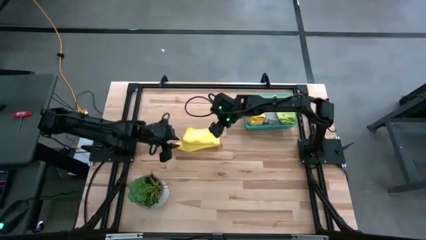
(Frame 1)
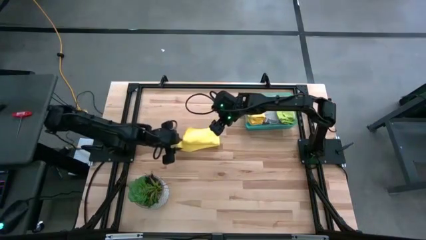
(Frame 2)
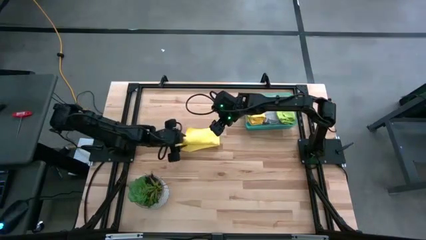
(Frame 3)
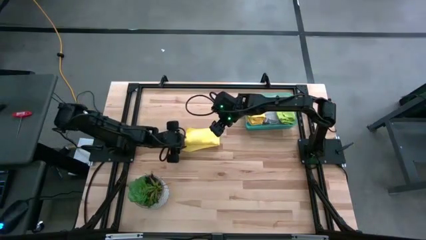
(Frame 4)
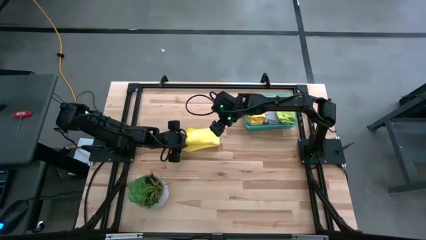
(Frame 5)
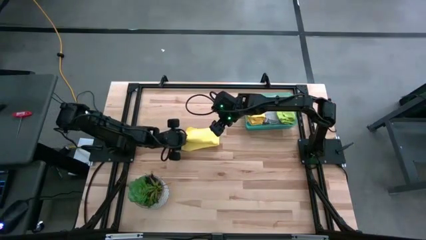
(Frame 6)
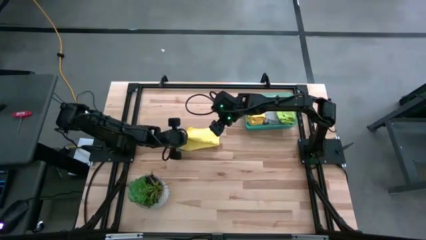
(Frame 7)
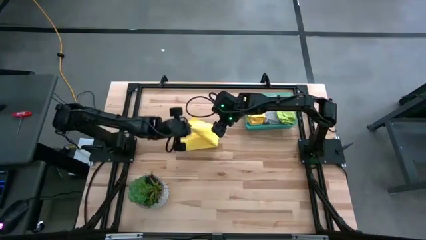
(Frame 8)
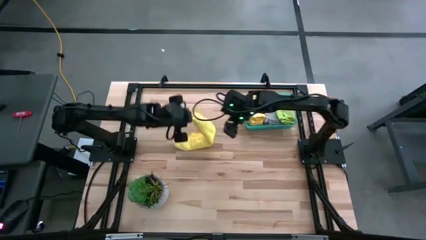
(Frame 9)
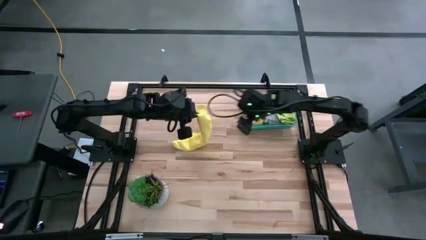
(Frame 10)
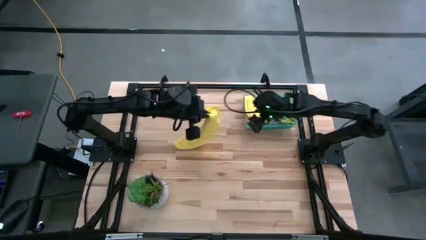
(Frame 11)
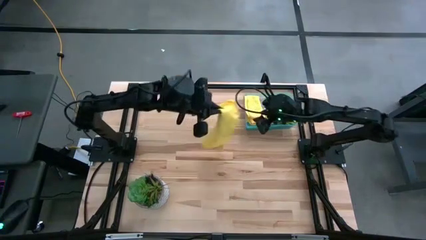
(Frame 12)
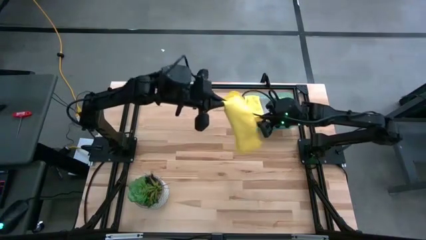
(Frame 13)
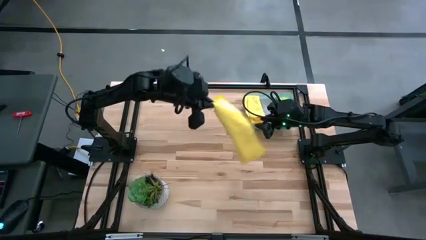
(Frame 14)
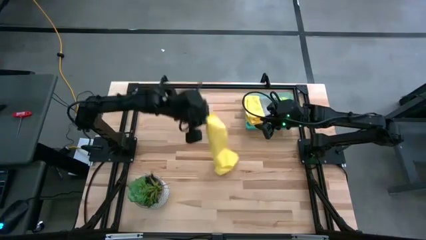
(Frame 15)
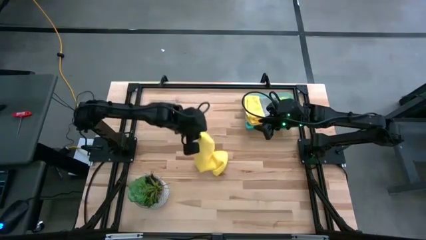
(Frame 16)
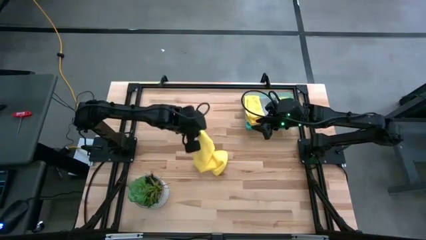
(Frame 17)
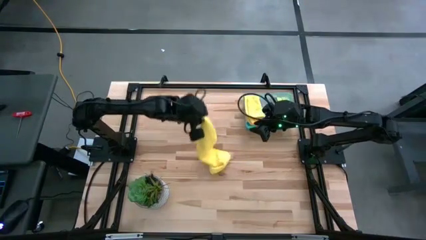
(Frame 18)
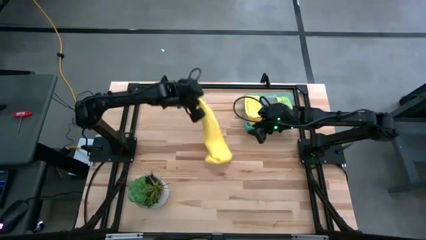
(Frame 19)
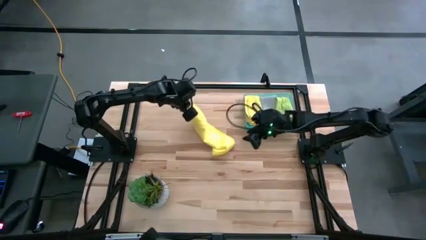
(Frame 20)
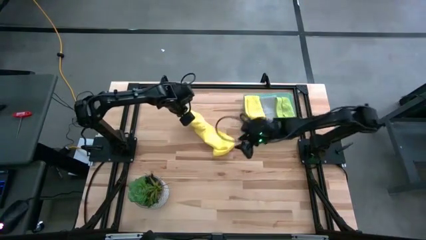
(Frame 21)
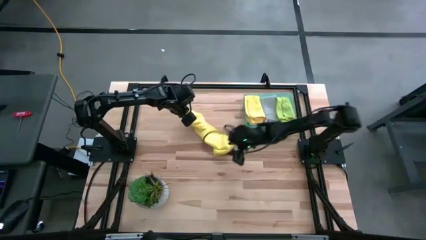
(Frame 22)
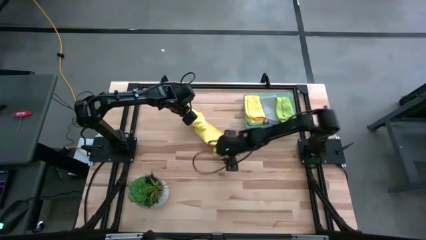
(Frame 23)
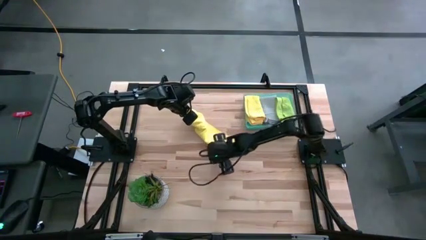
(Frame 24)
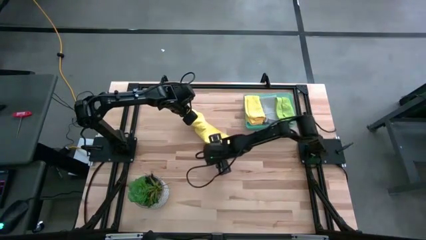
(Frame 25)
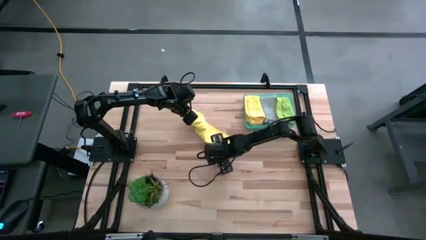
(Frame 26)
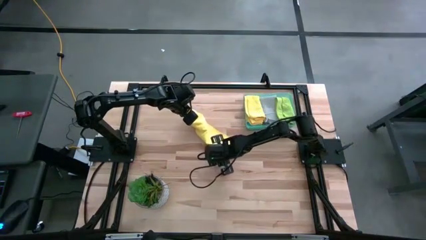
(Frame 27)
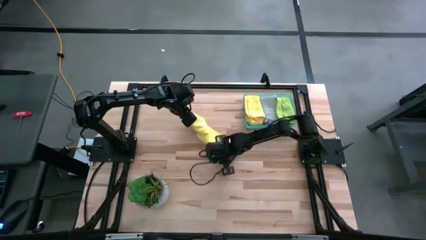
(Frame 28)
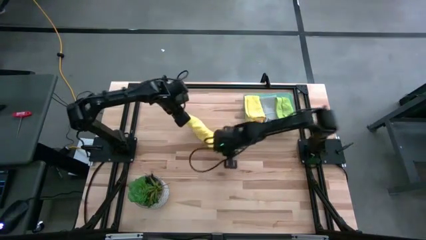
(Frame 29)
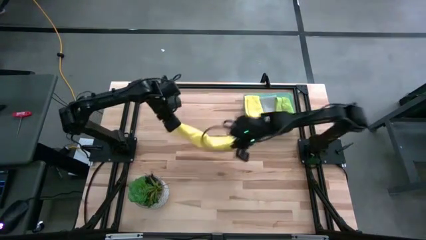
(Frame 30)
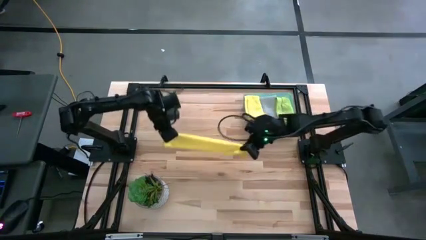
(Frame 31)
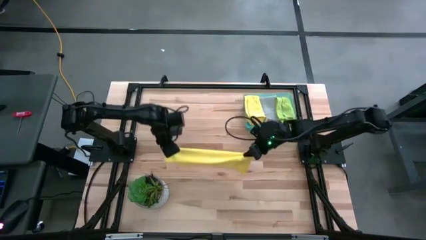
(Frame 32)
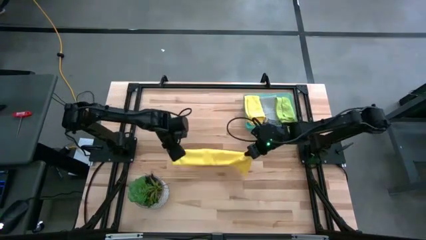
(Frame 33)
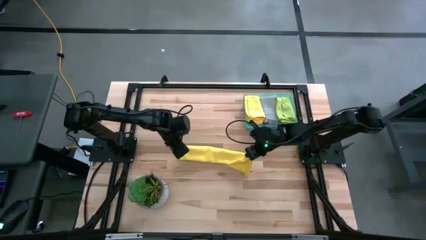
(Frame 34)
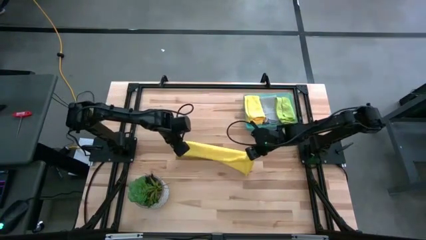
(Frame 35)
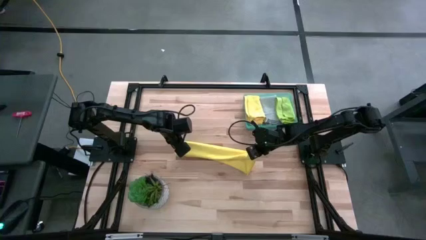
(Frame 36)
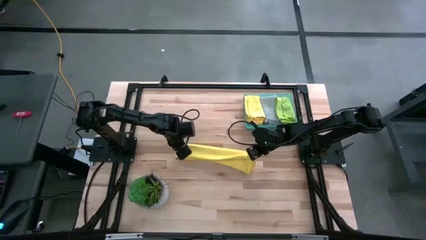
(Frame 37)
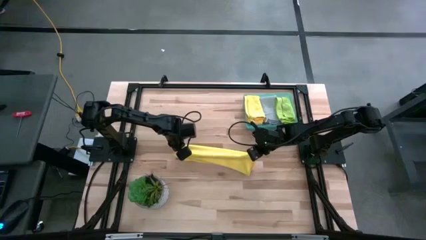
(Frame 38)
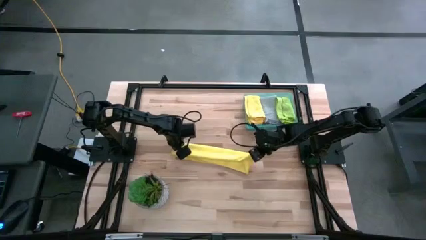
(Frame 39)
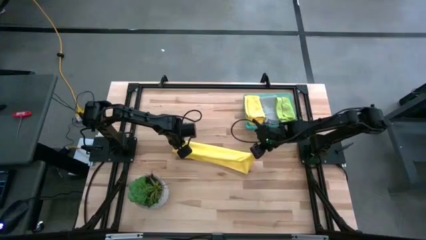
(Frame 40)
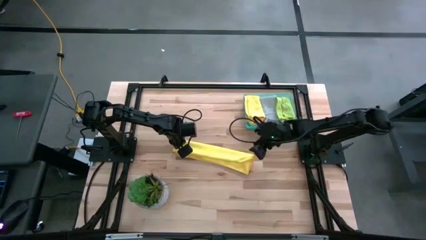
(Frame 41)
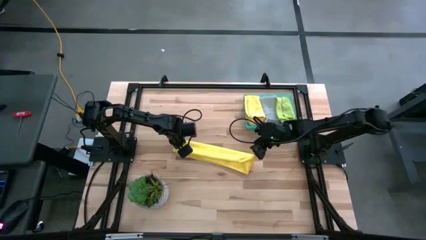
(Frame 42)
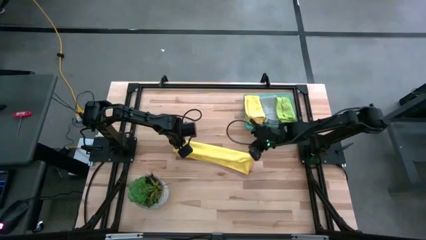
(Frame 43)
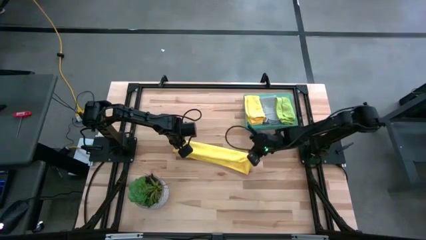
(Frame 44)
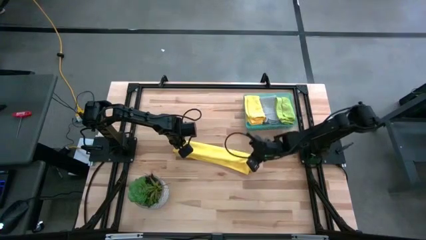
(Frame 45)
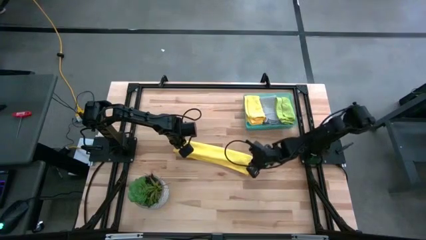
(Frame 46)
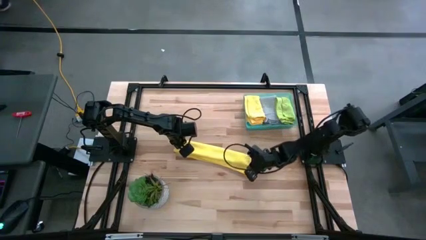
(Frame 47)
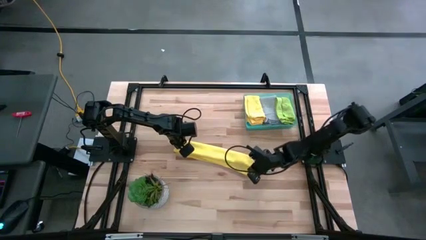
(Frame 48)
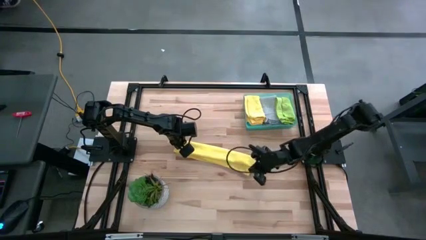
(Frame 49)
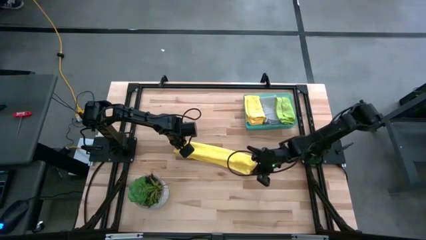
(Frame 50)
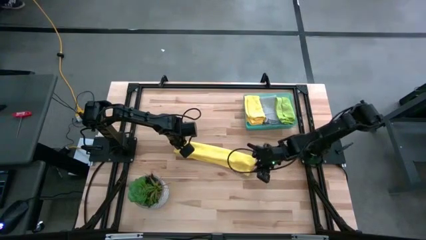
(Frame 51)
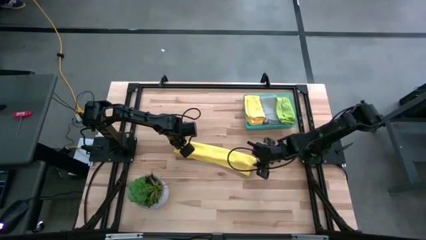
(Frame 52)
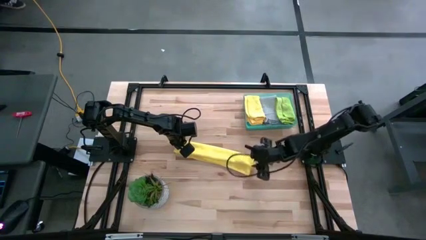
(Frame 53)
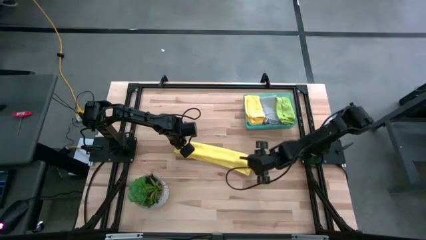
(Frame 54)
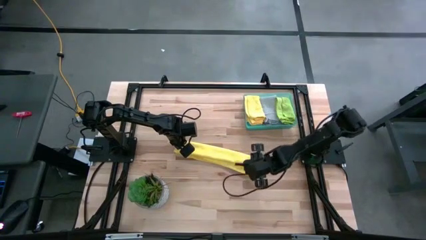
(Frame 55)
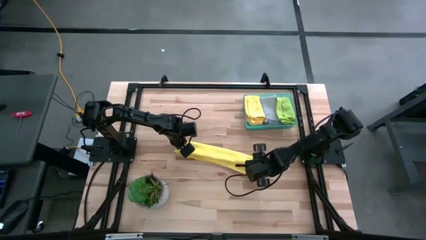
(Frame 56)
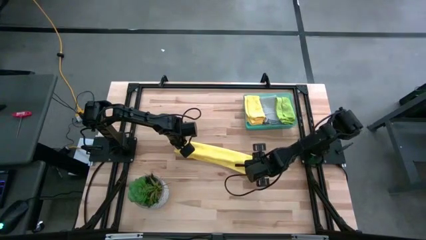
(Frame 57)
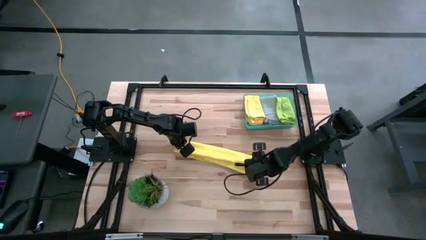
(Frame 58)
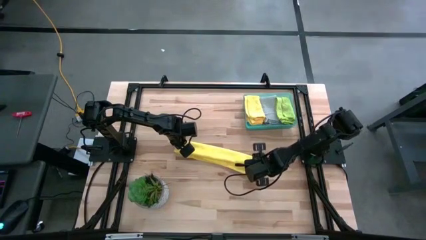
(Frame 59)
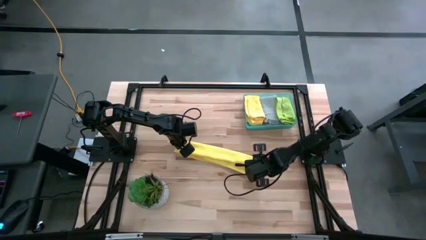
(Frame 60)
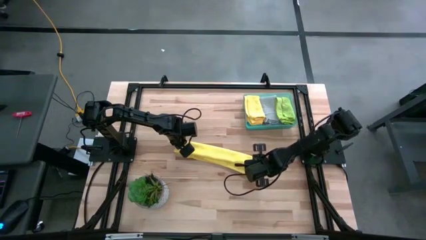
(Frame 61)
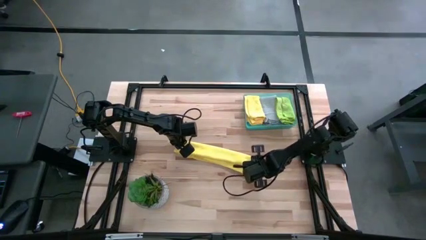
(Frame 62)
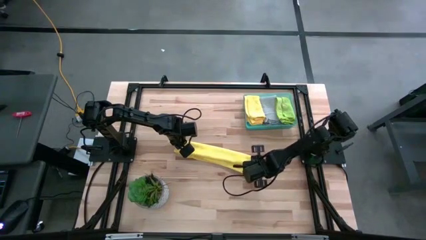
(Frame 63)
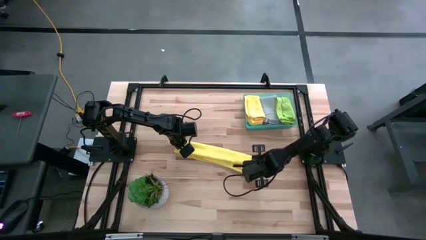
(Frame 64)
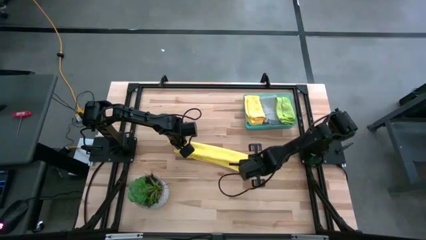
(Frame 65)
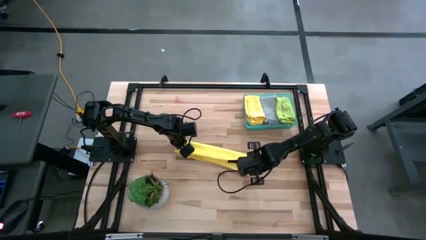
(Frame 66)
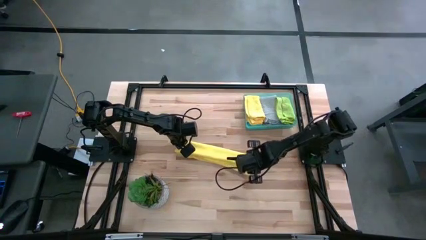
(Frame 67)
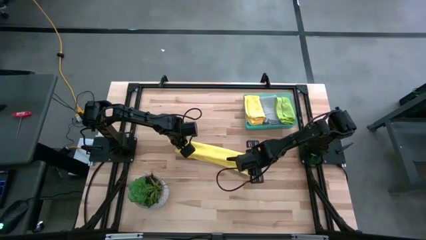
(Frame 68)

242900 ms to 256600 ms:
Task: Fold microfiber towels
Fold the yellow towel

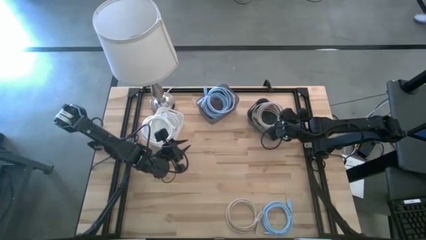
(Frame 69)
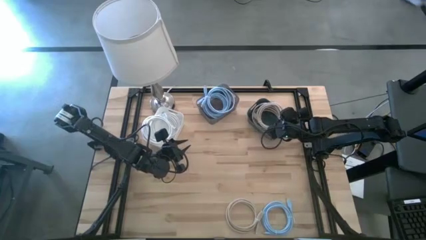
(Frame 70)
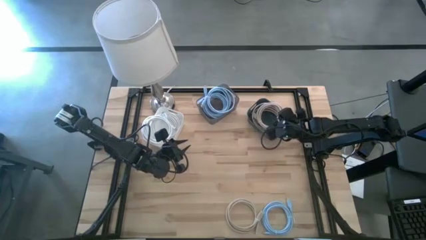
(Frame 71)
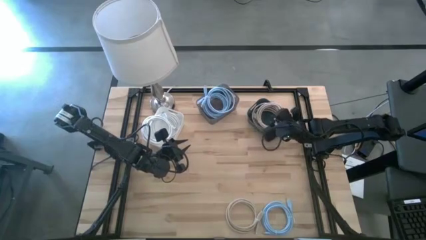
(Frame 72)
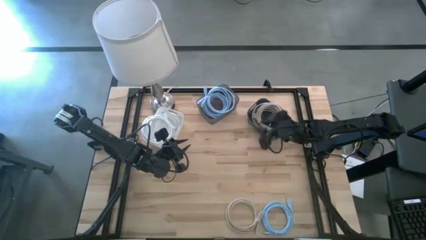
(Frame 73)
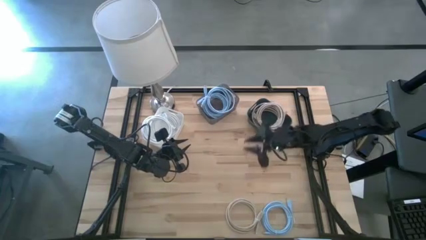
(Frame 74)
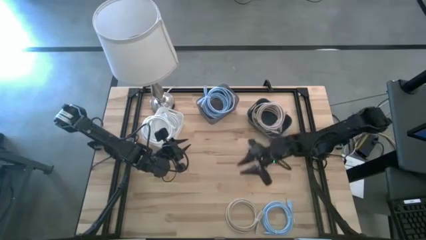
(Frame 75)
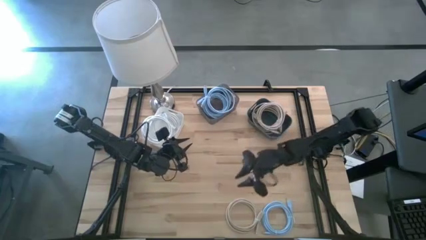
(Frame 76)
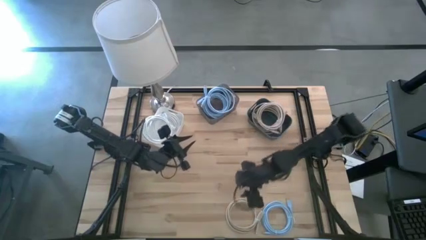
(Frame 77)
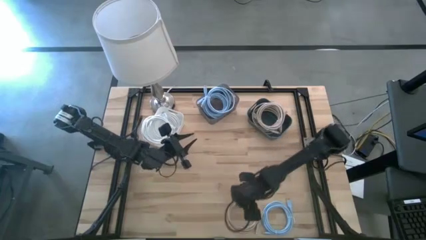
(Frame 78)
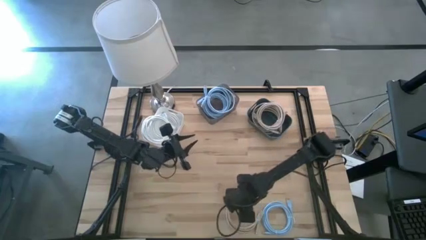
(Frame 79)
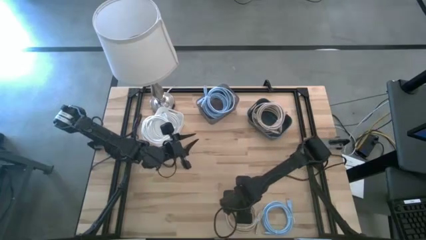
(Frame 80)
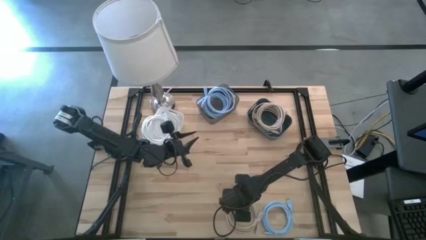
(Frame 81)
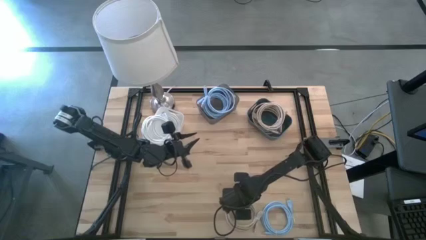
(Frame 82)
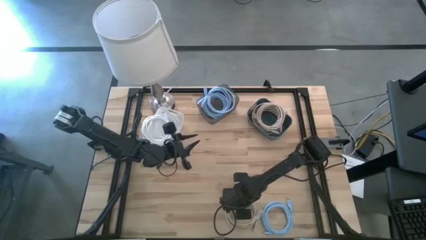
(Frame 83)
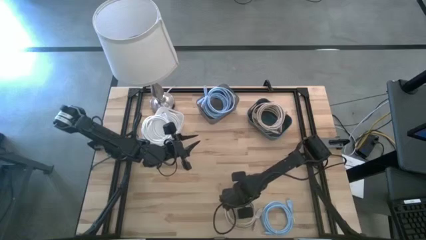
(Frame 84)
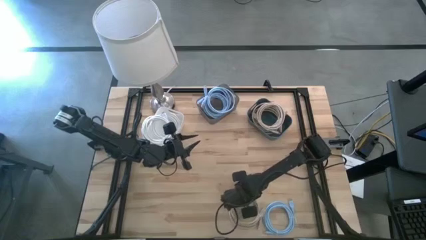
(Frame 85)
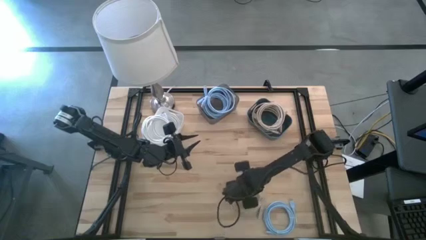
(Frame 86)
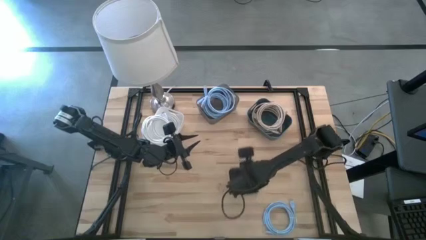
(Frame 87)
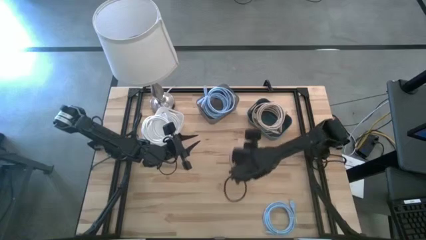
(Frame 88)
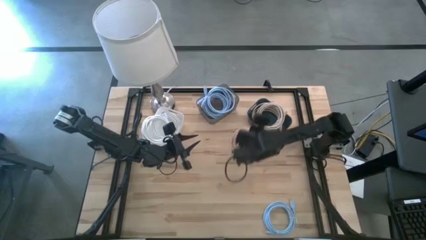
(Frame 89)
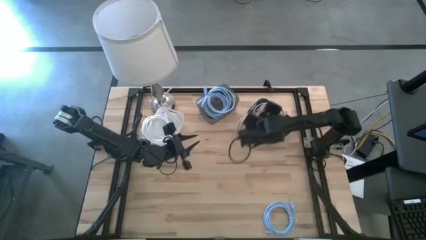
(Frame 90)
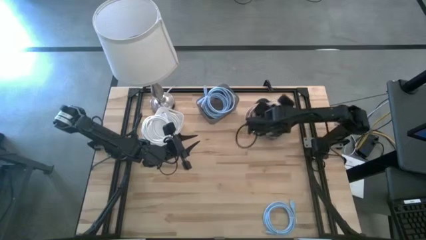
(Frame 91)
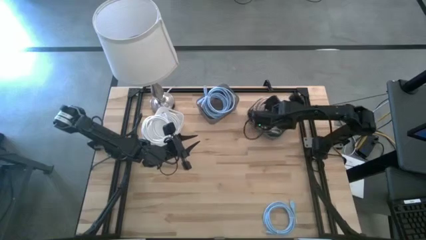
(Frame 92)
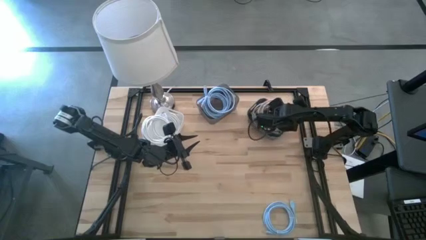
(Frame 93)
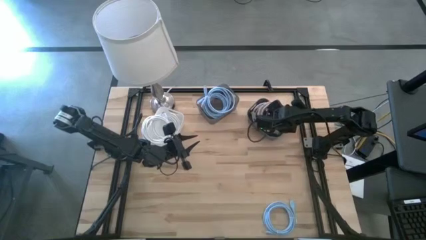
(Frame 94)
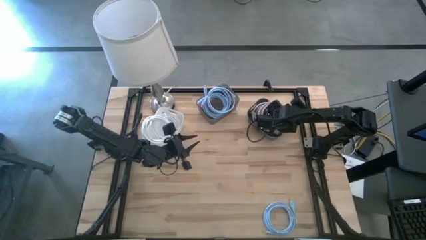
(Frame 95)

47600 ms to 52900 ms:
Task: Sort HDMI cables
Put the light brown HDMI cable into the green bin
